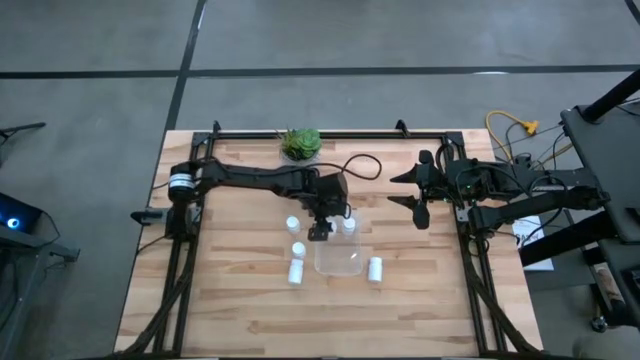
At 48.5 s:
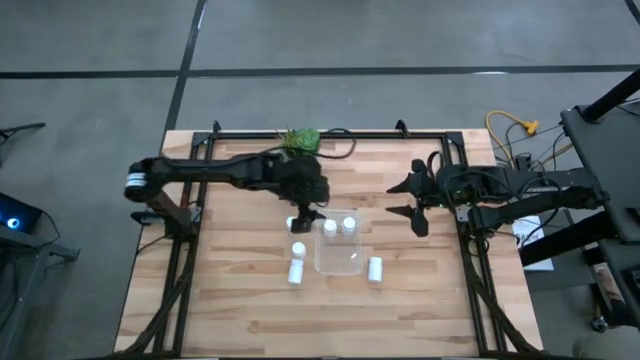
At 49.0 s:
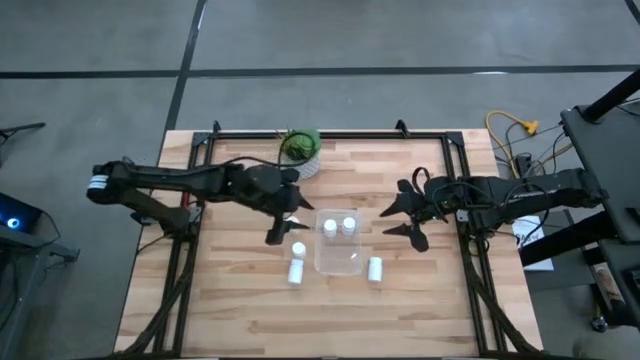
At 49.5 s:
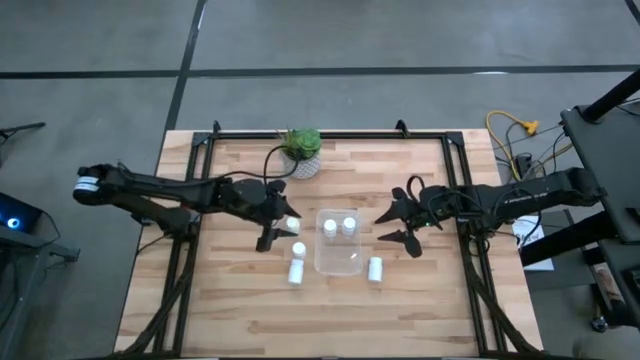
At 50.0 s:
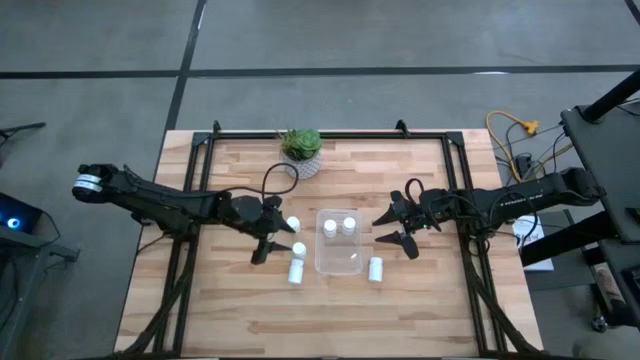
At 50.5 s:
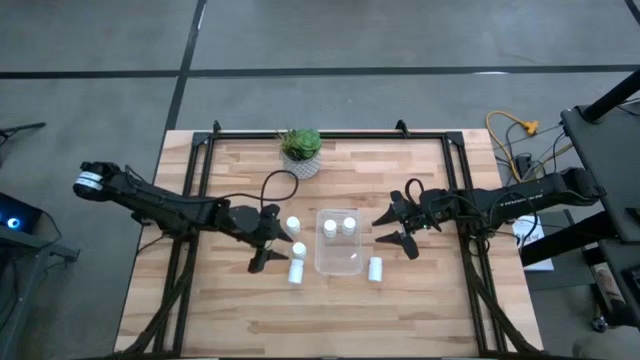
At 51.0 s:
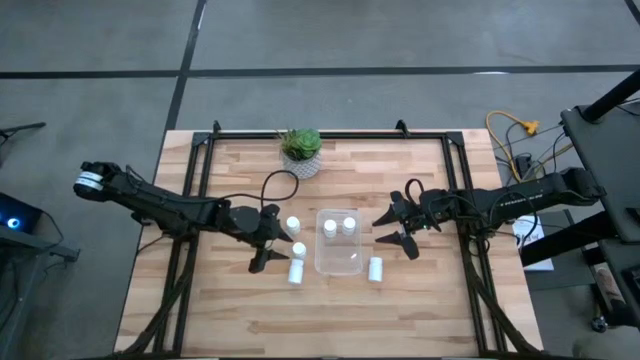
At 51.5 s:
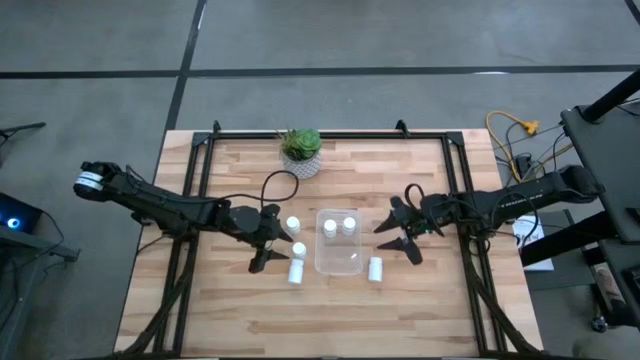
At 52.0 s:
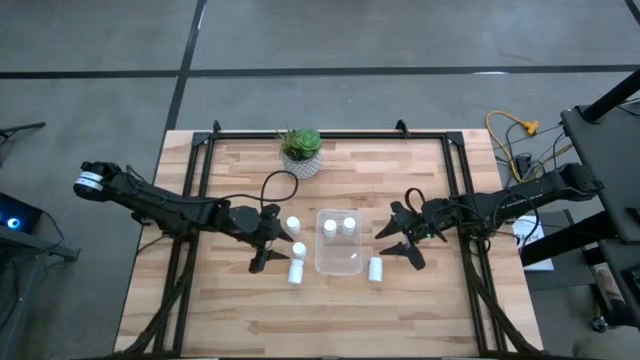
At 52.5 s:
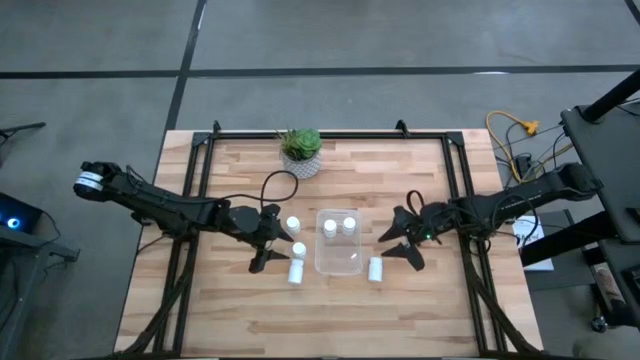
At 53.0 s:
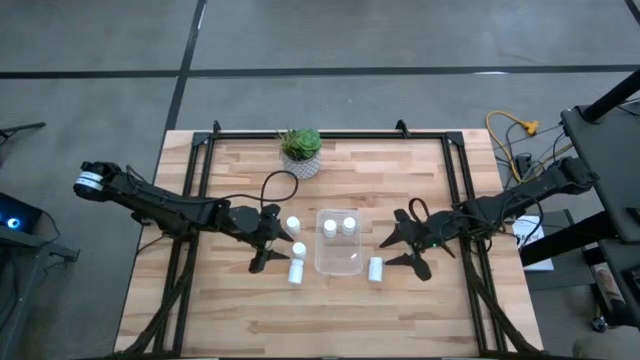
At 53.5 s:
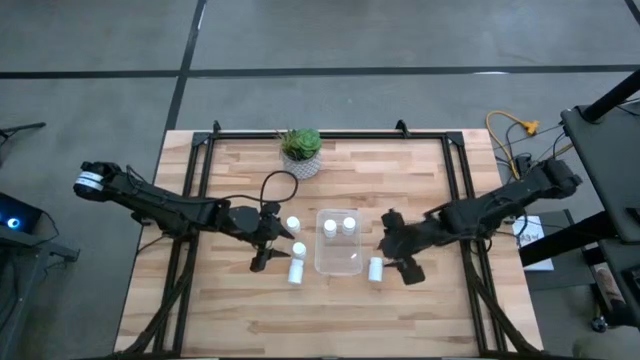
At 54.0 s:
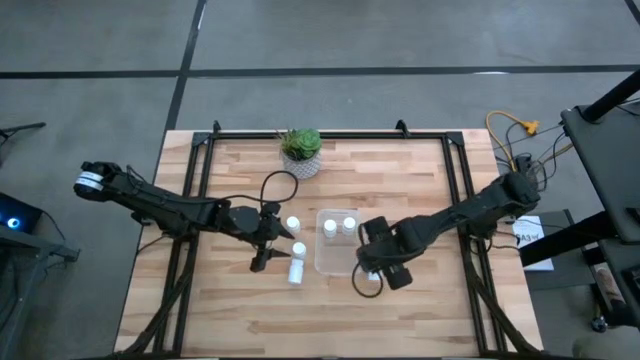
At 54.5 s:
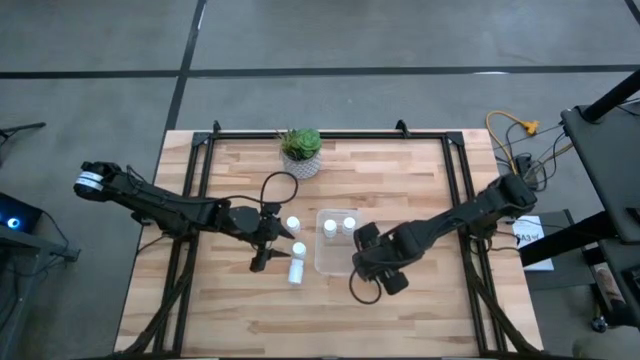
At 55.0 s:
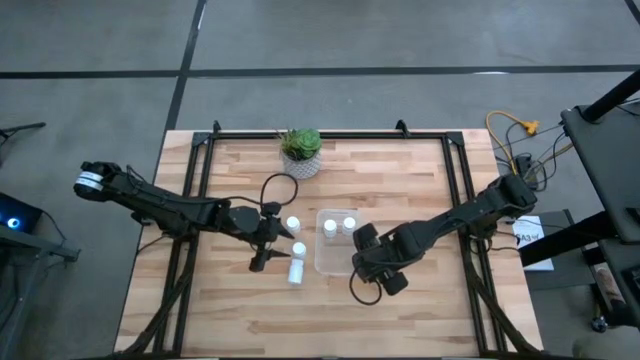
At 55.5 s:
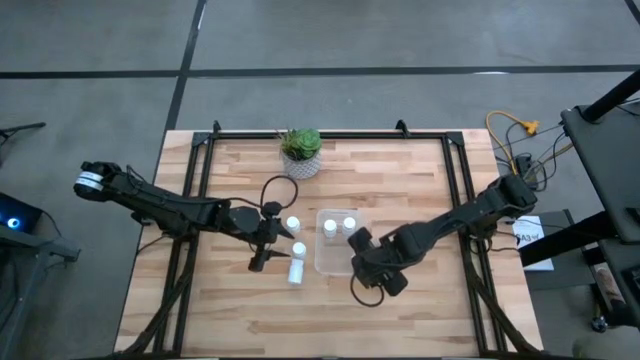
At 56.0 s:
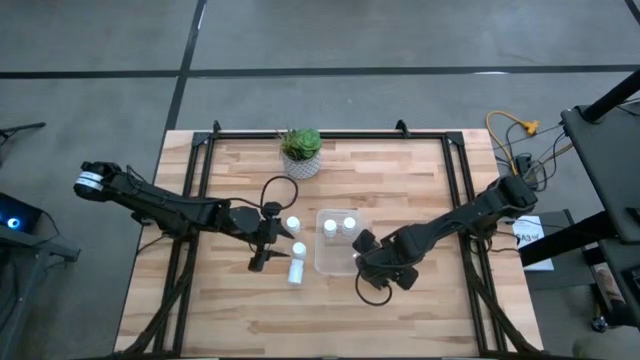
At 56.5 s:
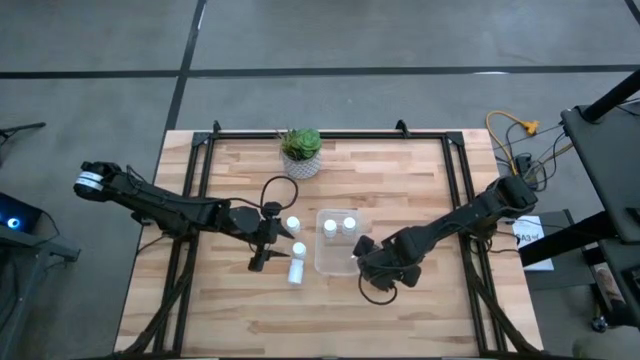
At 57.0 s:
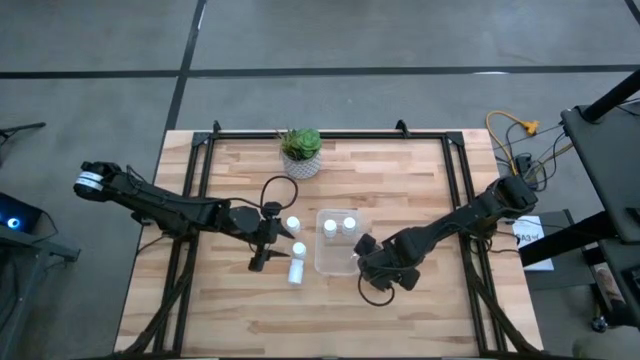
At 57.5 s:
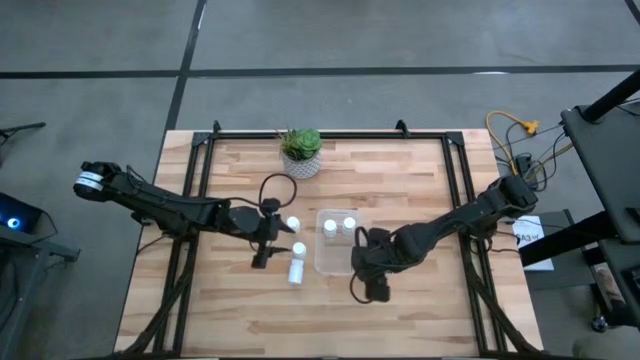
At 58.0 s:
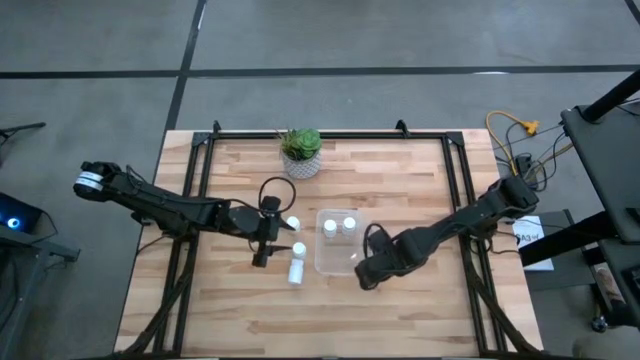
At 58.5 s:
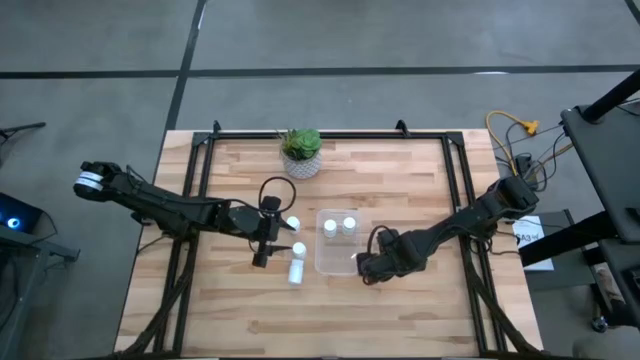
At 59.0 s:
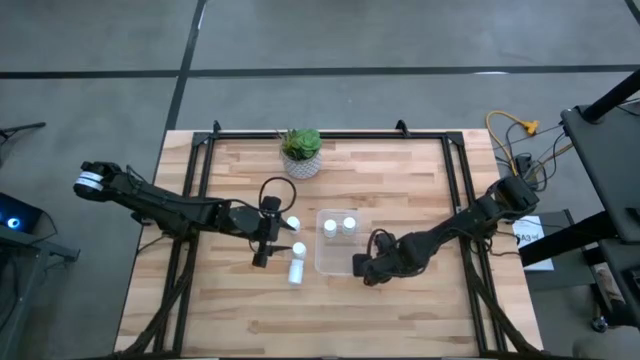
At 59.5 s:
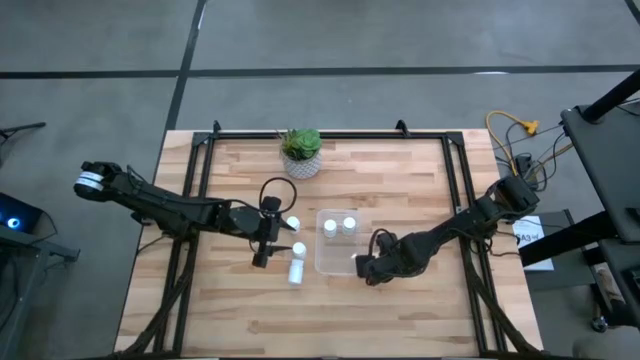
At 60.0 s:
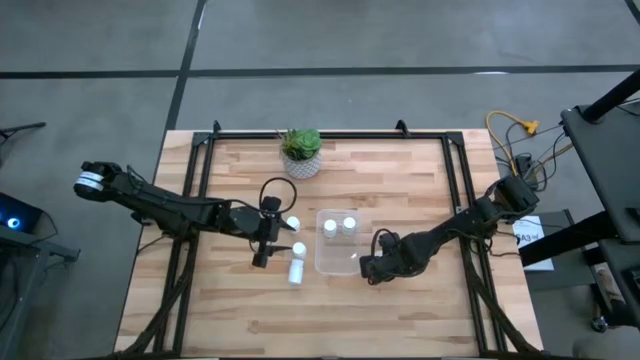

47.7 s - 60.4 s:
Task: Pick and place pill bottles into a basket
Put the white medicine bottle into the transparent bin

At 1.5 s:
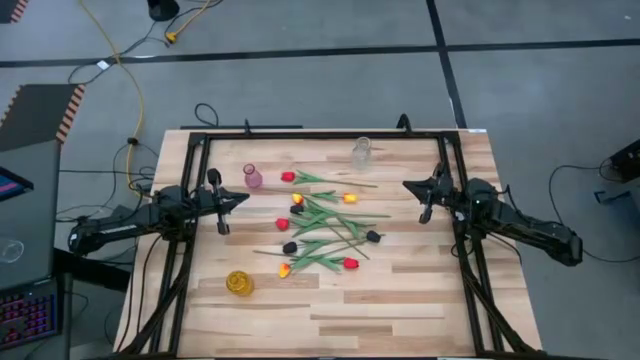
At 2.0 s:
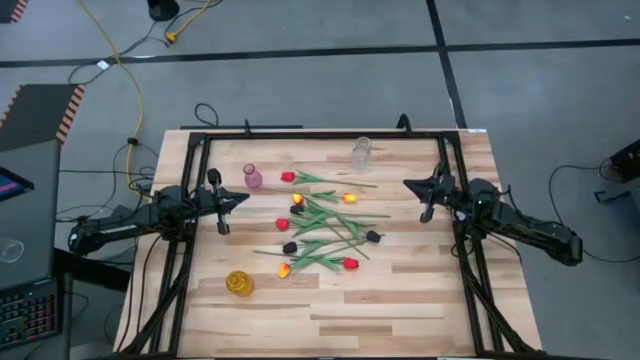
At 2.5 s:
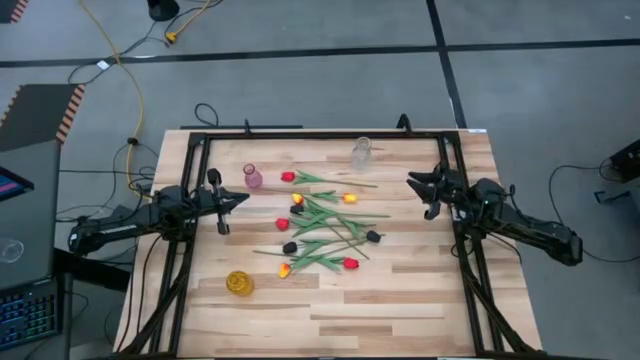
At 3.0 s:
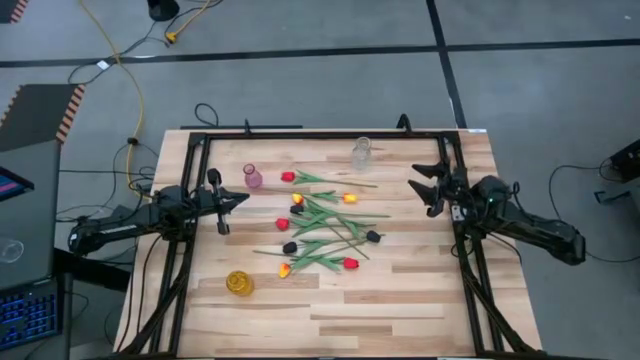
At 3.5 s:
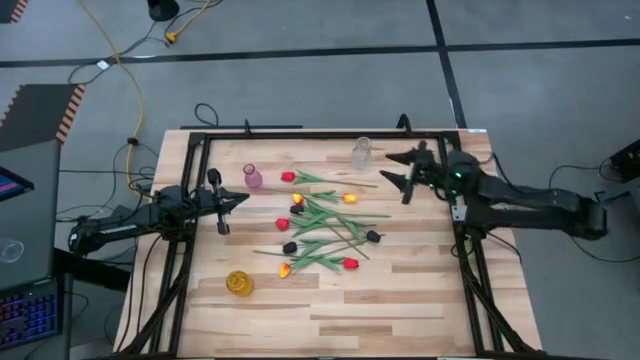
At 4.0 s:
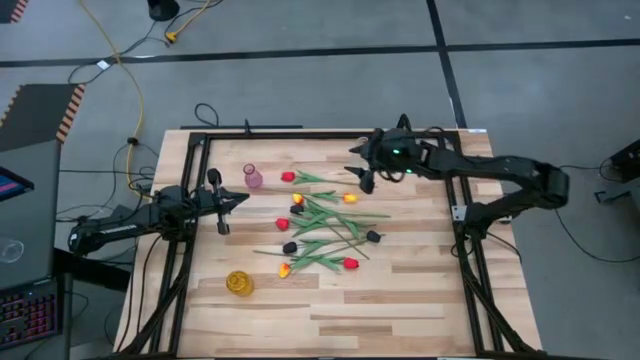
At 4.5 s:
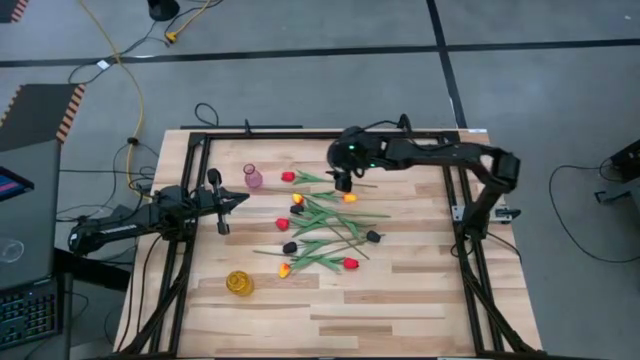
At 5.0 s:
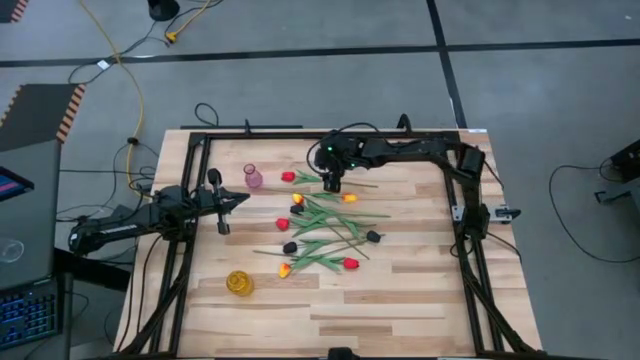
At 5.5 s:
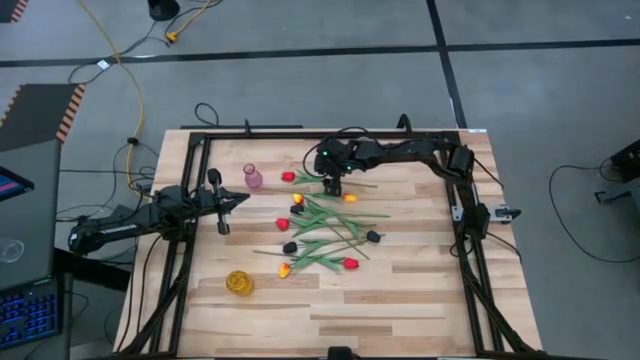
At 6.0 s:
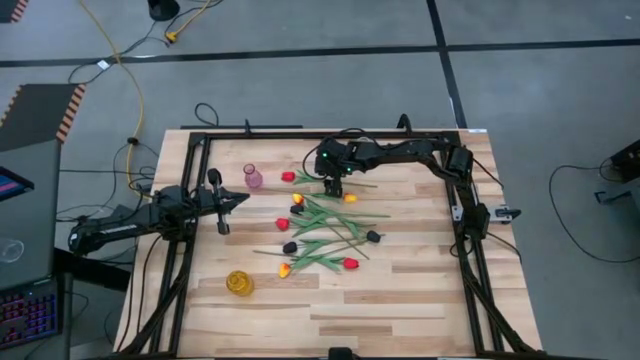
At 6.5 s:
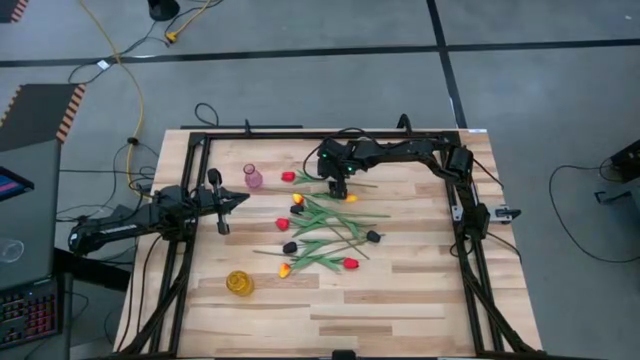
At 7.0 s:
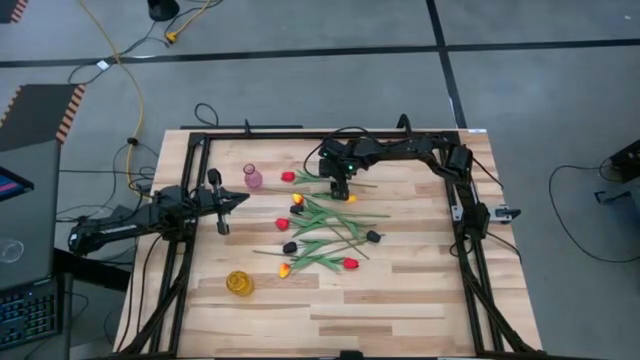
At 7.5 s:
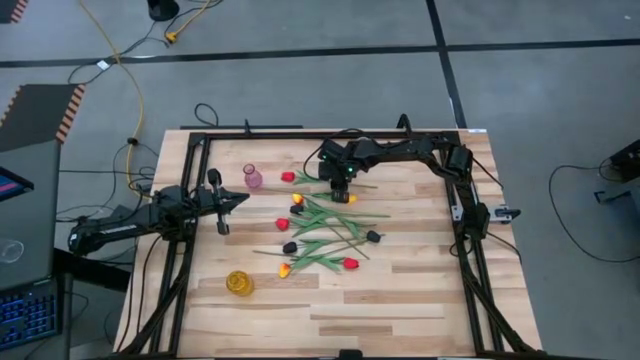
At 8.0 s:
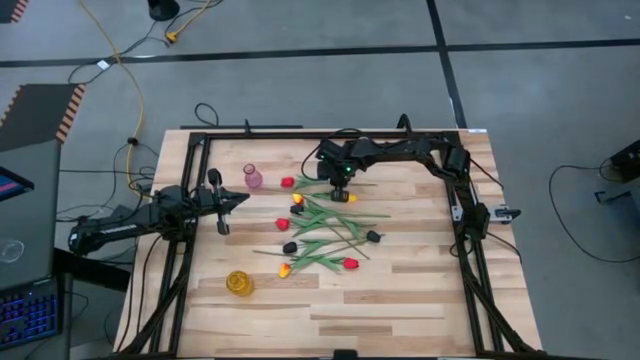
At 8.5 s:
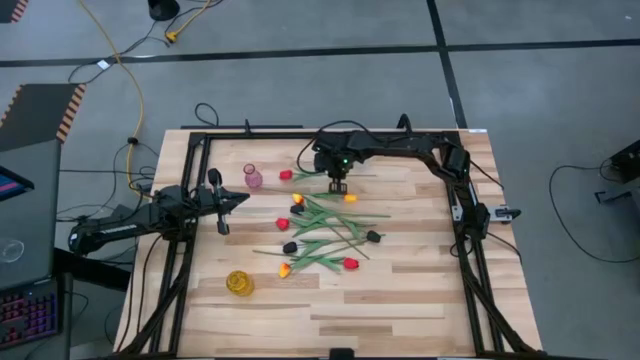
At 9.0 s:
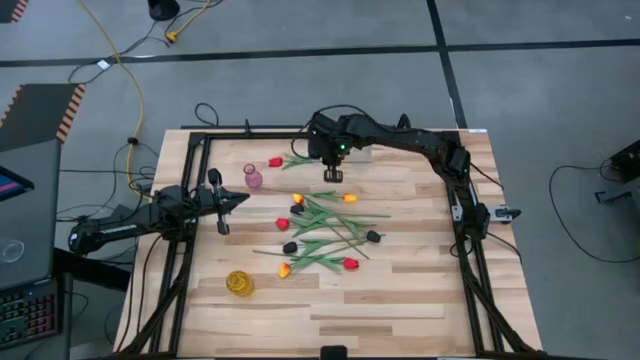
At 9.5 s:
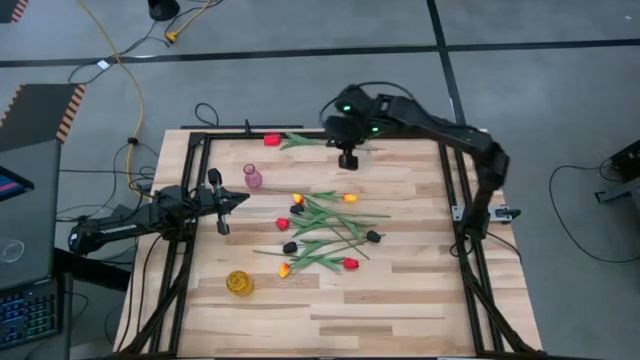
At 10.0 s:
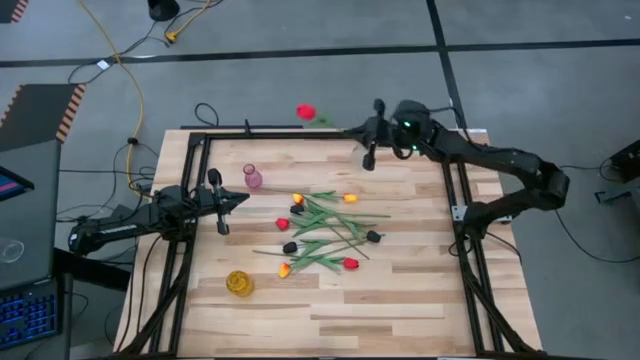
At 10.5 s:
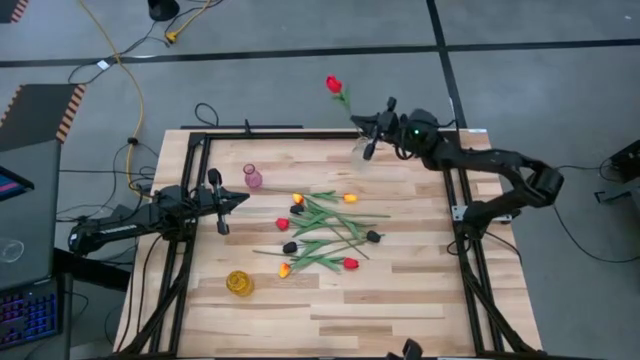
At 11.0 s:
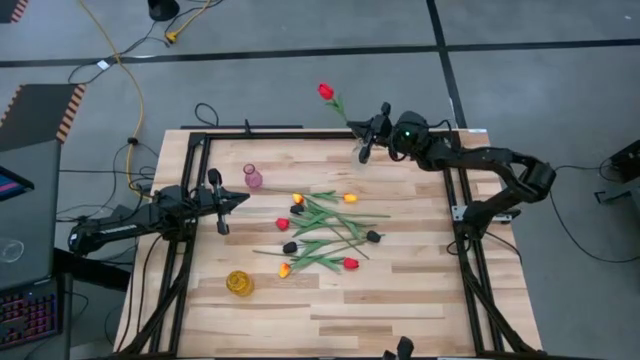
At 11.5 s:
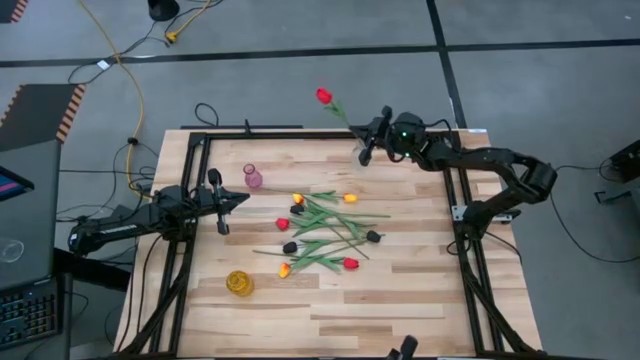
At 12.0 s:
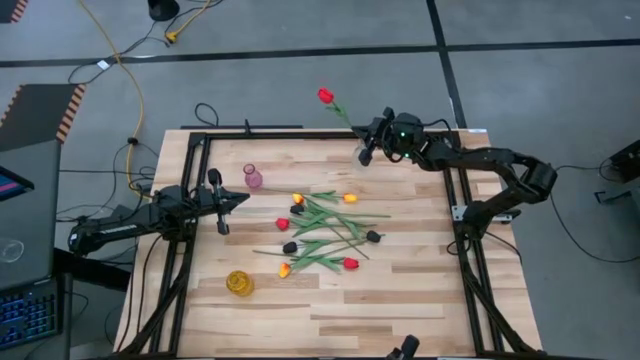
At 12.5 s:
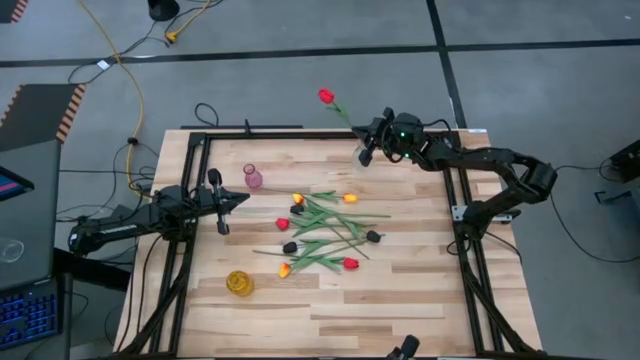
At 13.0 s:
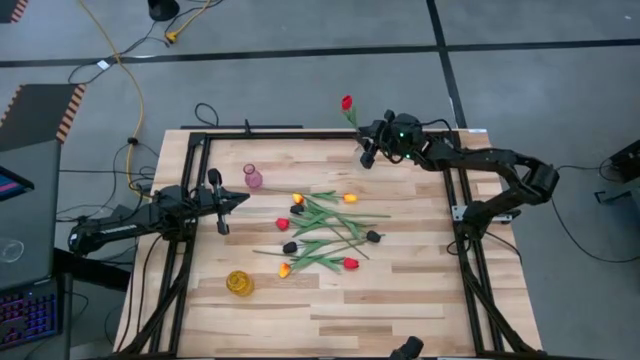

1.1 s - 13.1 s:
Task: Sort flowers into vase by color
Put the top red tulip into the transparent vase
